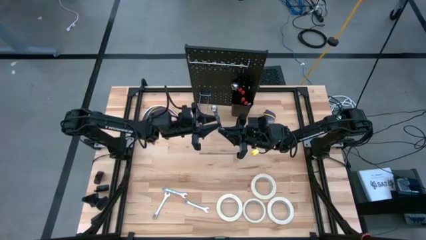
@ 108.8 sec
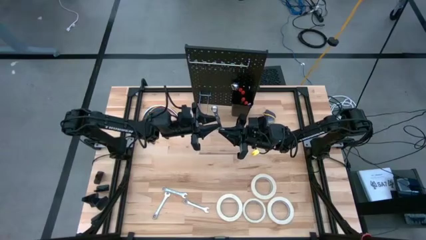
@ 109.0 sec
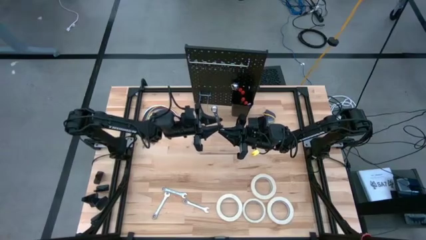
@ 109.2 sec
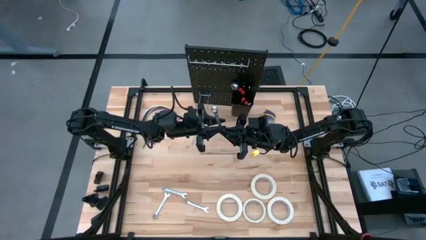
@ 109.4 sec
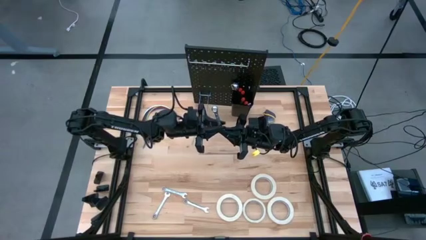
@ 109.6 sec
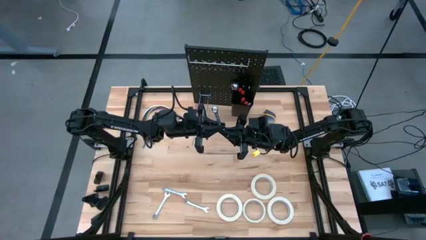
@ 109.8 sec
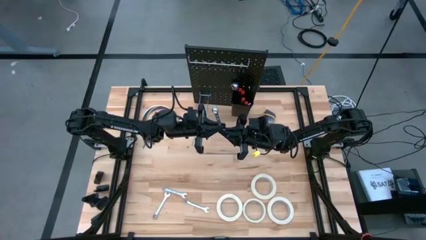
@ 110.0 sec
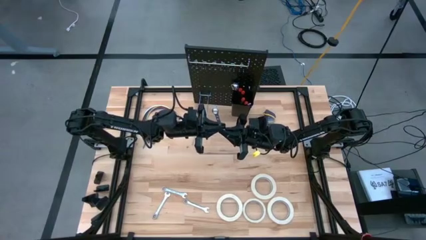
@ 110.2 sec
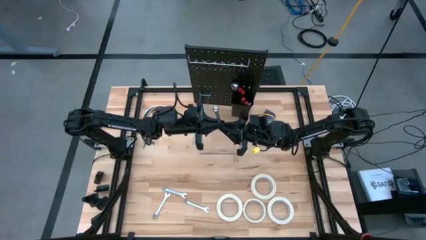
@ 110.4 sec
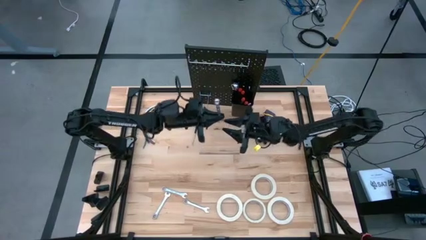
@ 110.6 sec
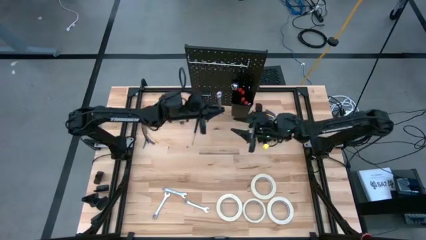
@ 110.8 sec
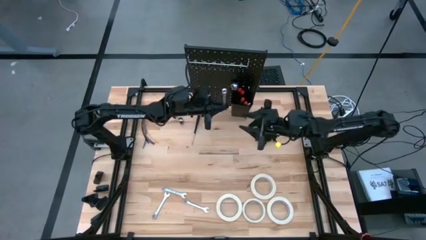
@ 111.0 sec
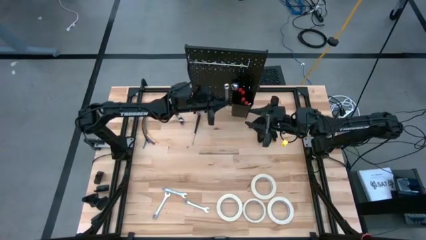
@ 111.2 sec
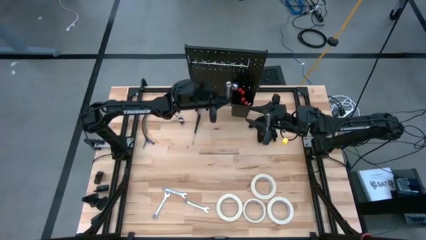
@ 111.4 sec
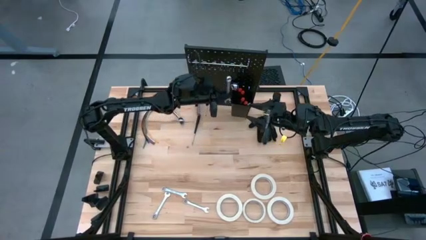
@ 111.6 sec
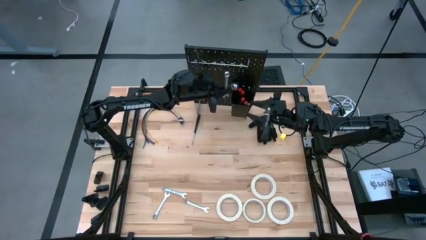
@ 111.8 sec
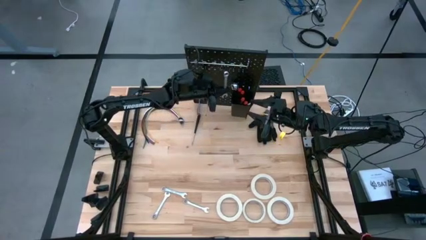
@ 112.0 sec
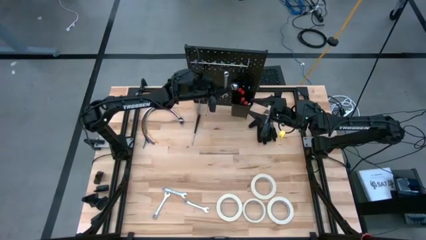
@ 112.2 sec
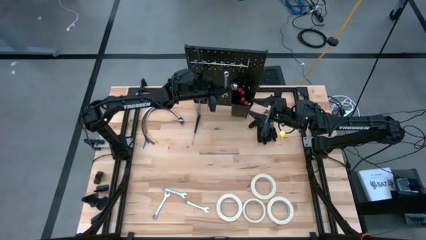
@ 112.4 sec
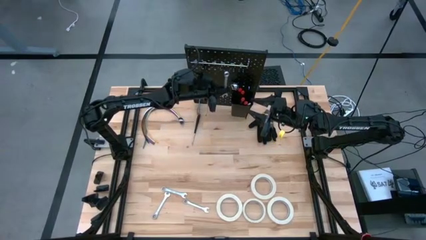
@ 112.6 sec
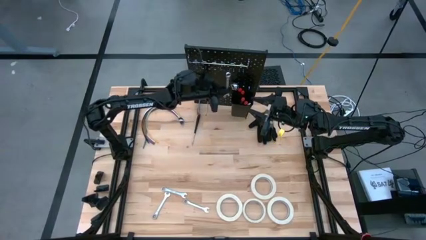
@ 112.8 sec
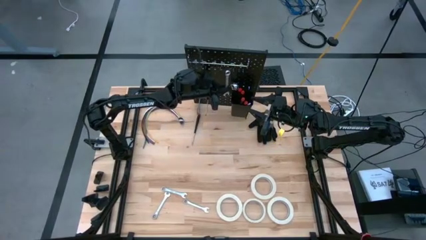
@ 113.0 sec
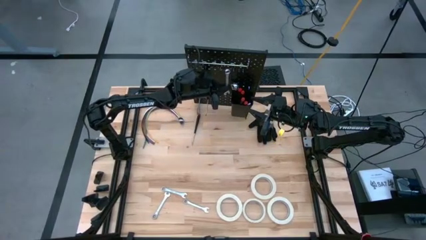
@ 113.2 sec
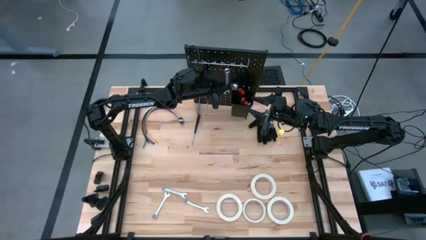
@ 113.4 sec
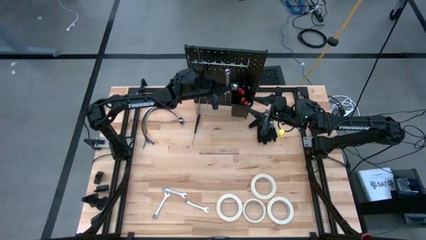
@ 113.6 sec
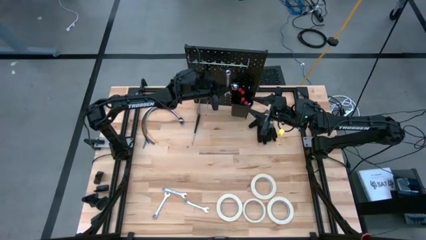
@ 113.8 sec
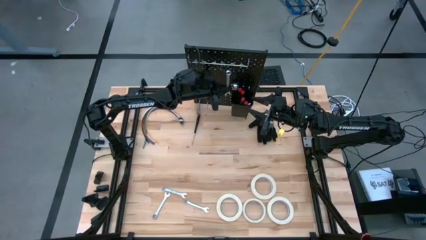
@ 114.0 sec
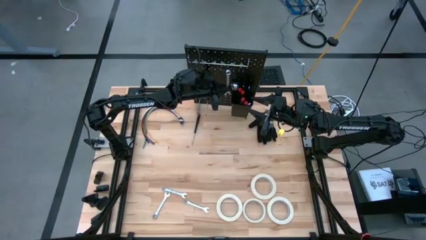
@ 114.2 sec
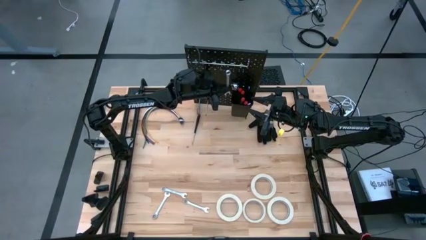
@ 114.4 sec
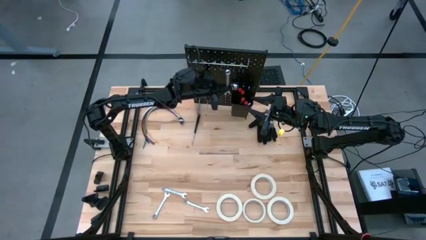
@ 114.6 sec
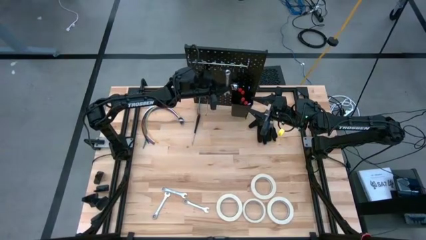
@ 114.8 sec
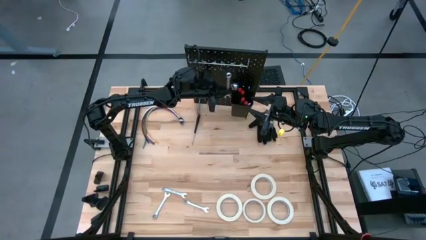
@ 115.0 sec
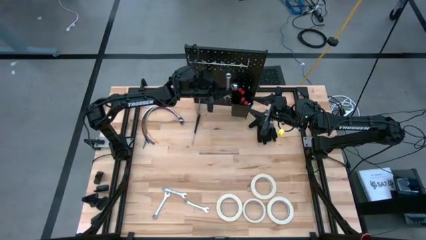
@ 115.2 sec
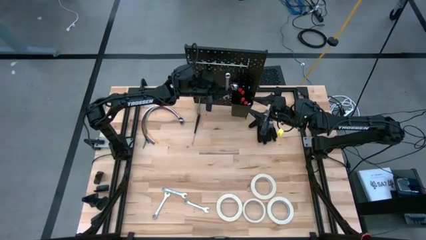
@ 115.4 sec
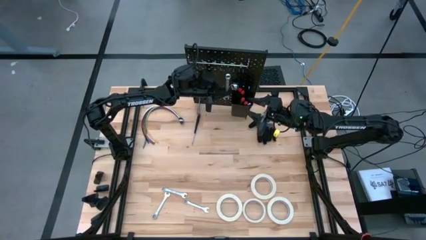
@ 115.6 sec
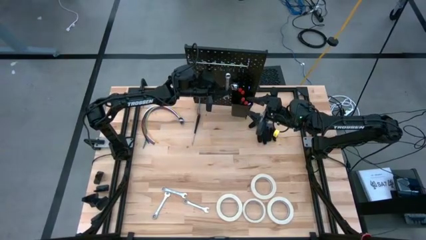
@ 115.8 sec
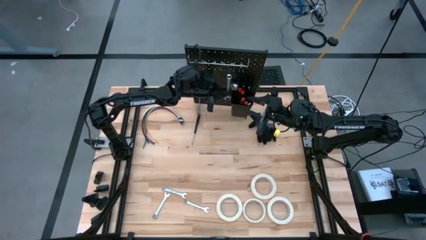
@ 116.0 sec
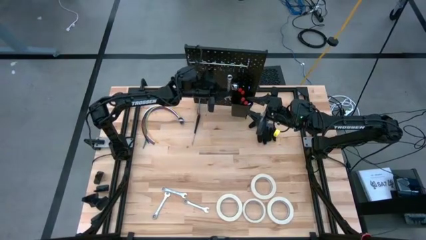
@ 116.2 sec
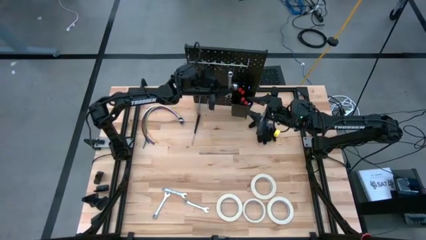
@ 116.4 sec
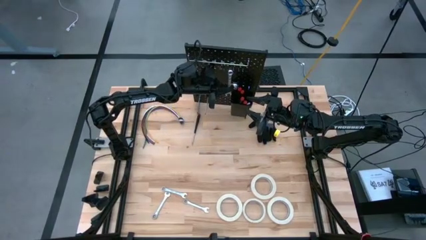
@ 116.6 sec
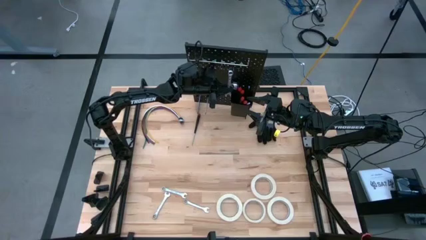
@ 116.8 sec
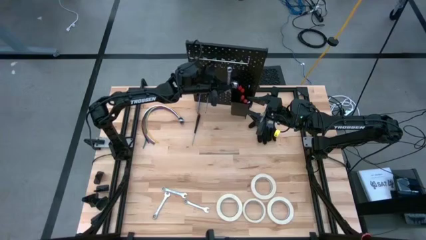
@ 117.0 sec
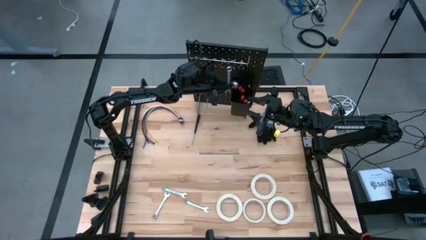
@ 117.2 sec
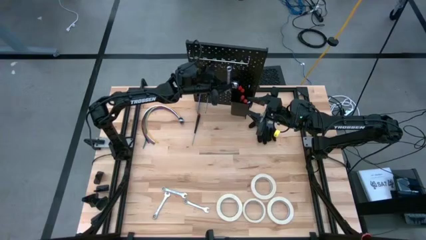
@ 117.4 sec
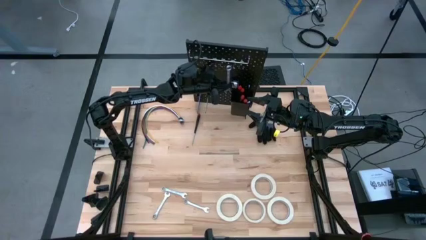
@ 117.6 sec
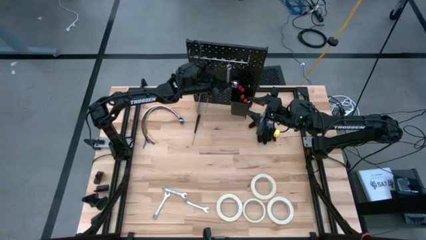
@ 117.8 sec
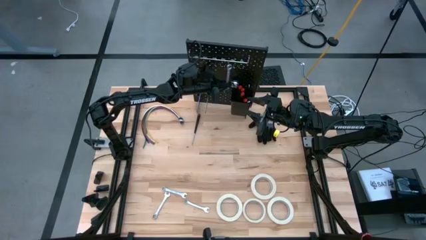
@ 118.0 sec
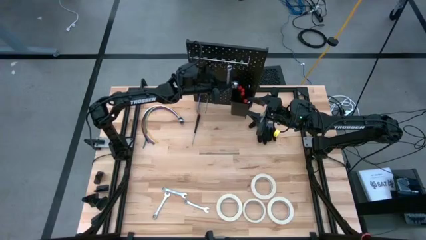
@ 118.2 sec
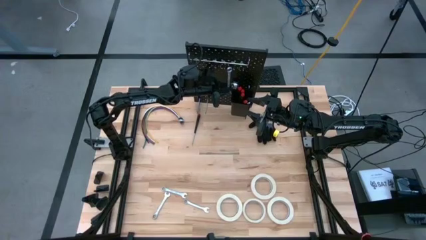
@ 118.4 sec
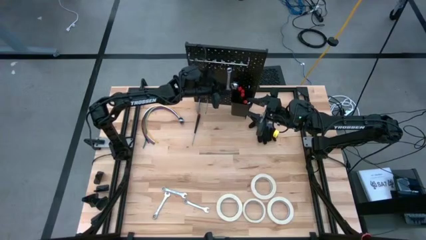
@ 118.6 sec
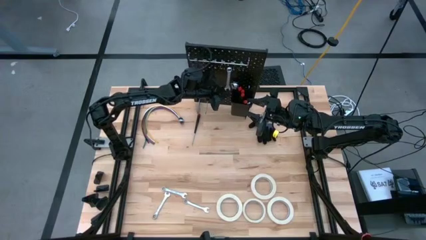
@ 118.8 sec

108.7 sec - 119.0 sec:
Task: Hang tools onto peg board
Hang the silver wrench on the peg board

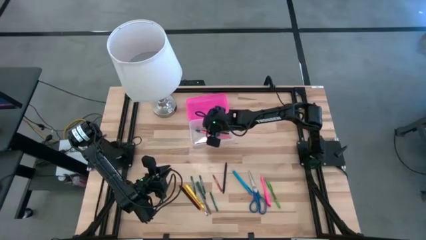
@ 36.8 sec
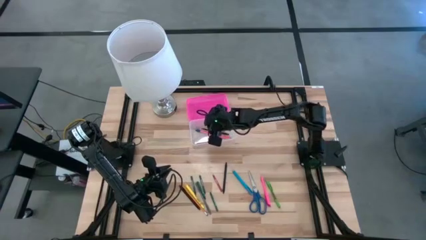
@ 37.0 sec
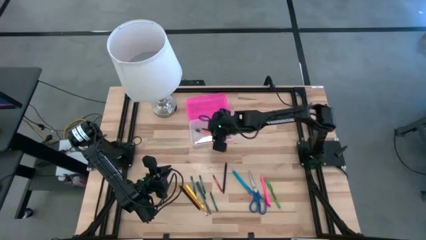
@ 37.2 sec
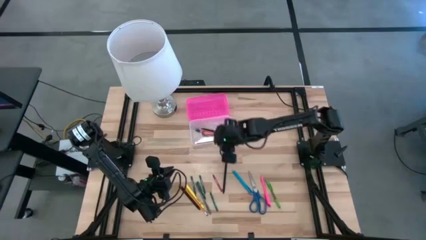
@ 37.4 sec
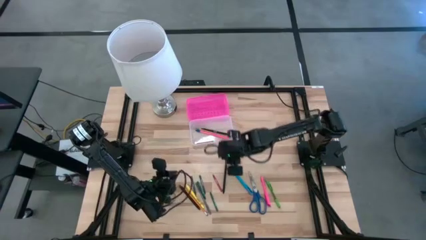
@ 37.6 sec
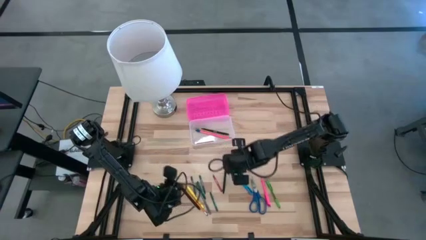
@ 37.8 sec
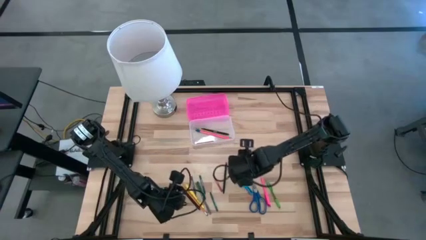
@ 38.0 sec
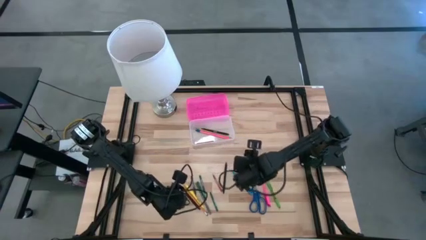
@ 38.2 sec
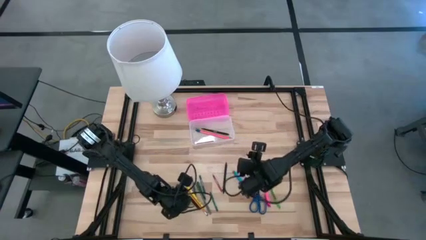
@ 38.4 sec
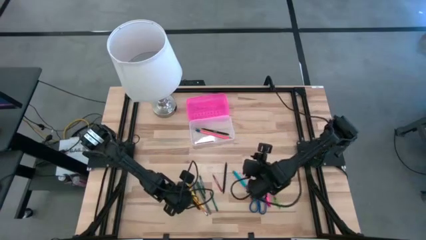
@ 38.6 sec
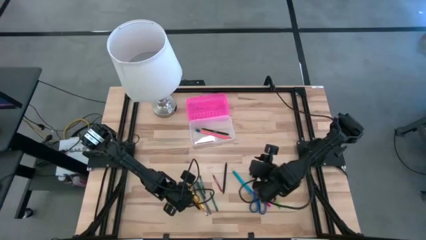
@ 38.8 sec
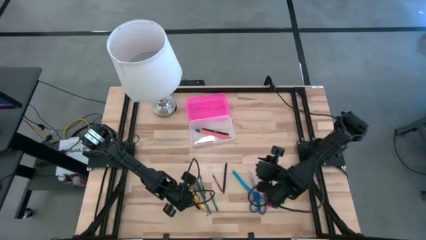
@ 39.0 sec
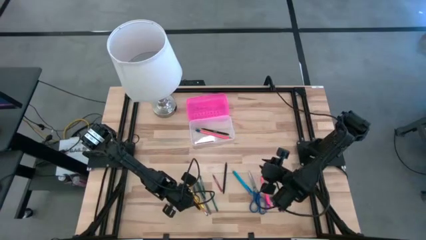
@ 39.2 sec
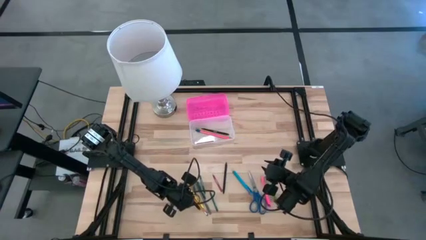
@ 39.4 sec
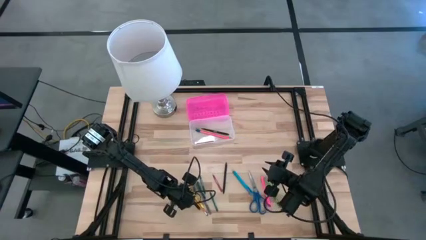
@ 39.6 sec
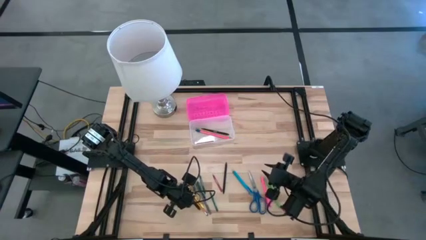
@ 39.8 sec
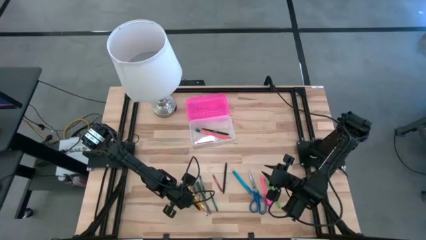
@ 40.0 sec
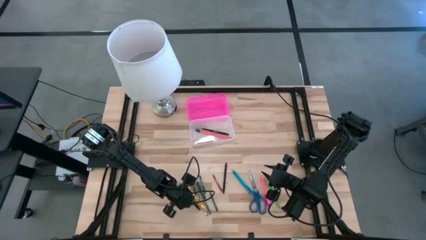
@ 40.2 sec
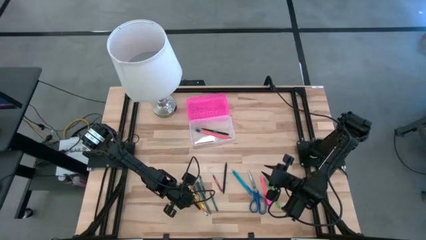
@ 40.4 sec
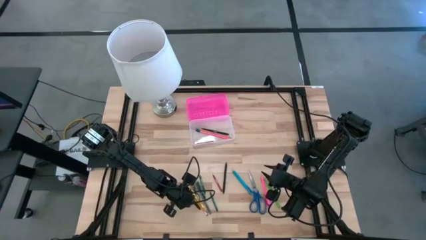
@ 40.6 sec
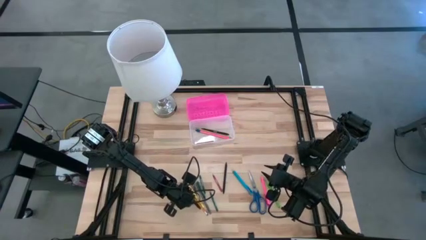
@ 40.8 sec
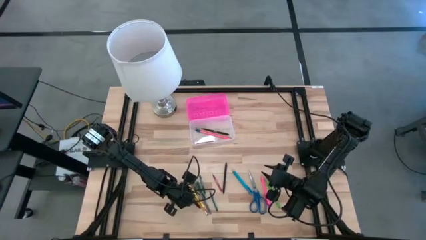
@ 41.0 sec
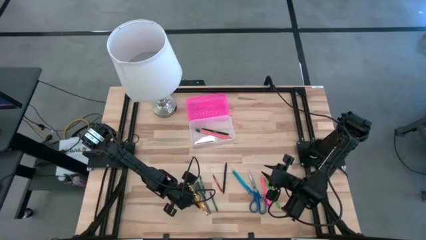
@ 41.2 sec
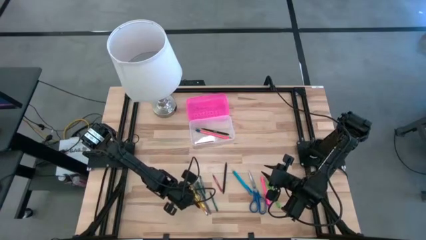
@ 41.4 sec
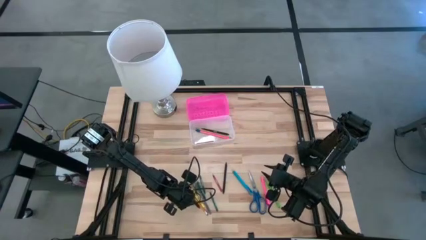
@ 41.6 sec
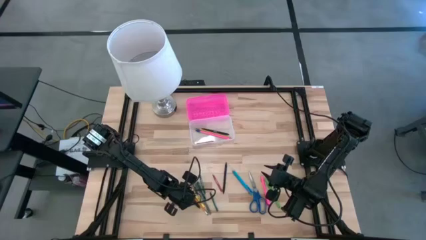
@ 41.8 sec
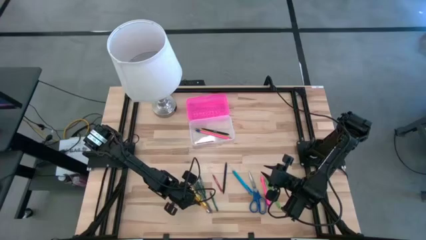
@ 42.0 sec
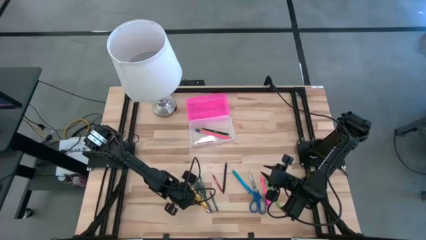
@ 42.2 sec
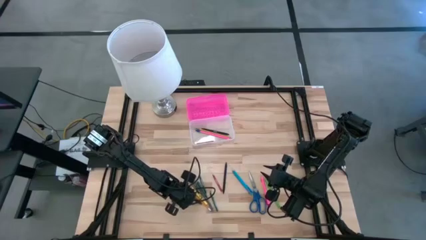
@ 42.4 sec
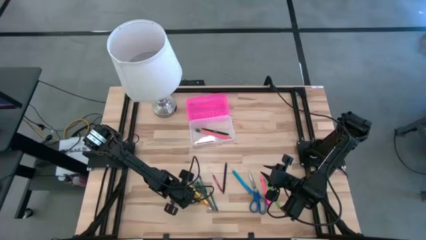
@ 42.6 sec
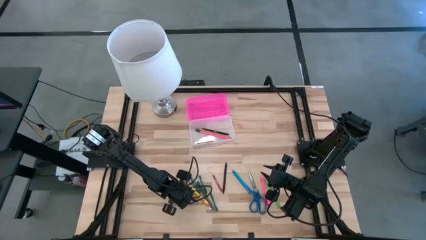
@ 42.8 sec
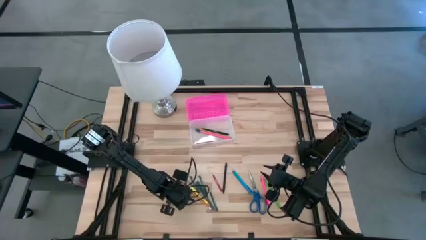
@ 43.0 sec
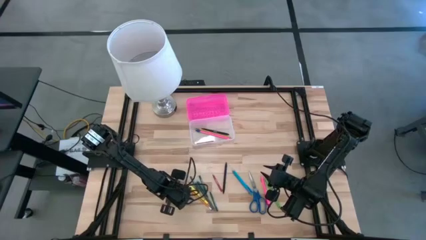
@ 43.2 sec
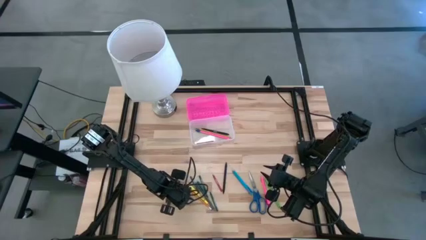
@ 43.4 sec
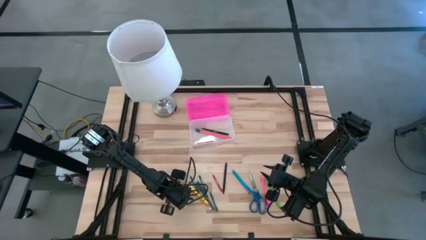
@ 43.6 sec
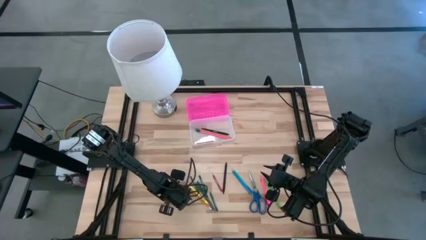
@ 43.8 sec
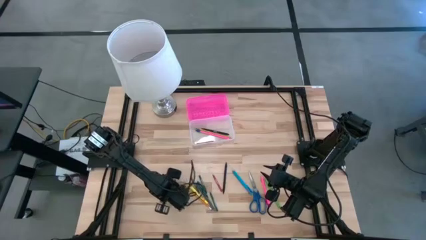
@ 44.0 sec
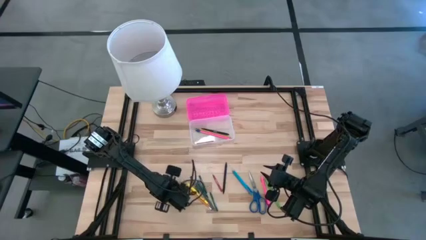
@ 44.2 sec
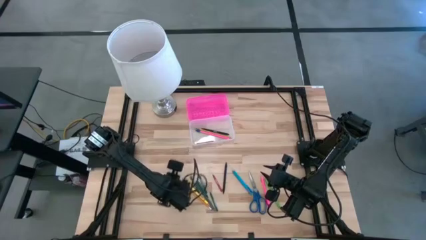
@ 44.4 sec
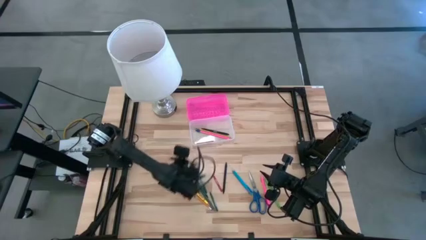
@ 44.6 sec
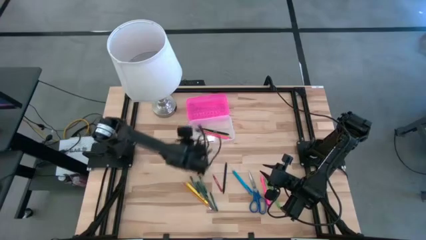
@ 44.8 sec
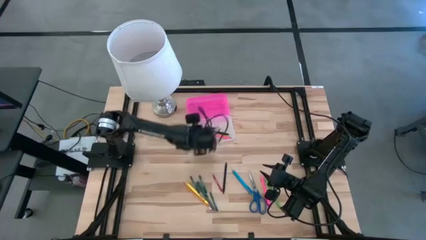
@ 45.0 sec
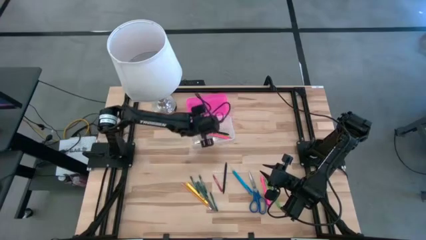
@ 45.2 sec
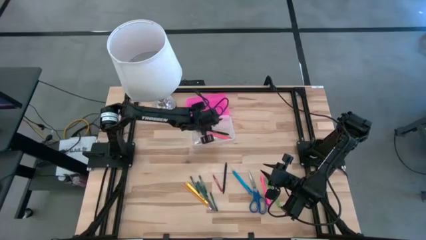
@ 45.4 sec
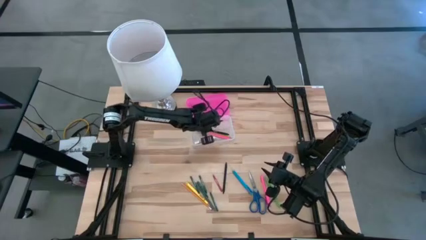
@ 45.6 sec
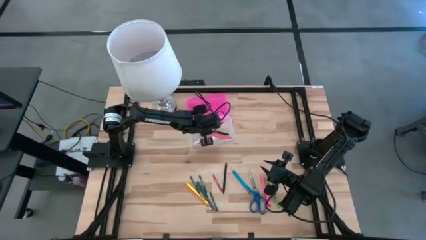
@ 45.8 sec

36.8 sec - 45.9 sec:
Task: Pick & place school supplies into a supply box
Put the black pen into the pink supply box
